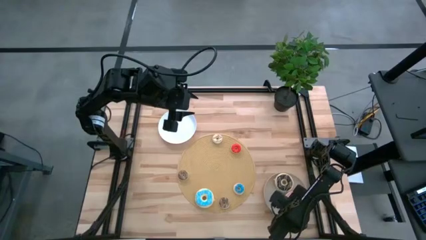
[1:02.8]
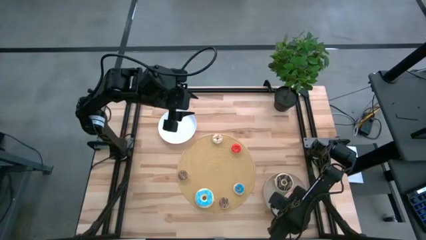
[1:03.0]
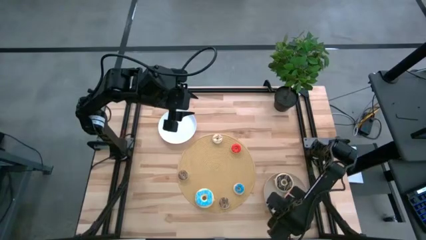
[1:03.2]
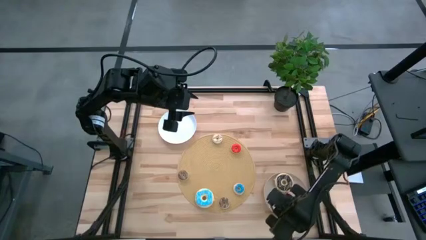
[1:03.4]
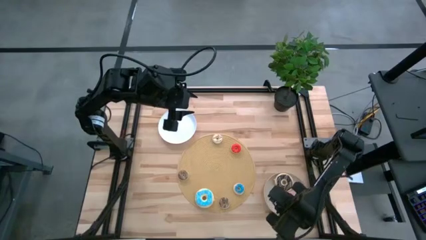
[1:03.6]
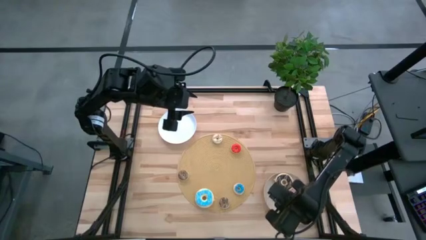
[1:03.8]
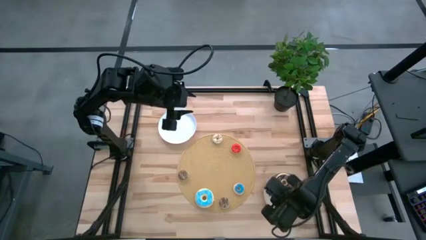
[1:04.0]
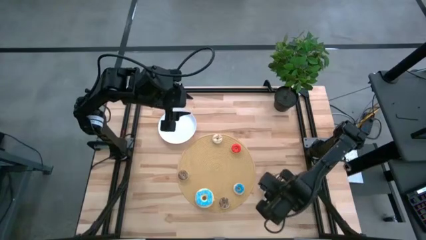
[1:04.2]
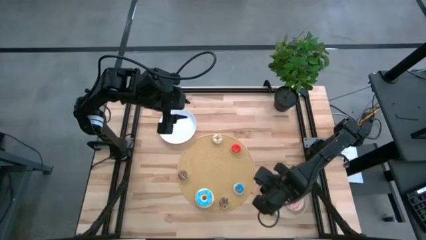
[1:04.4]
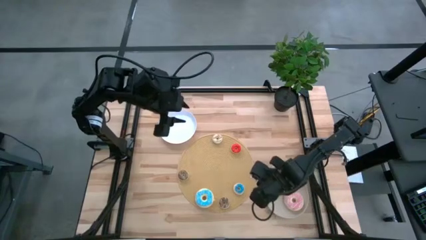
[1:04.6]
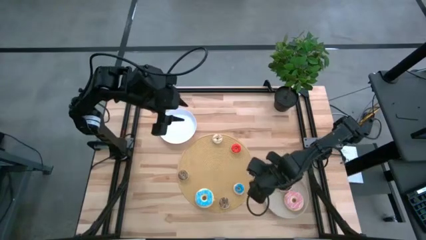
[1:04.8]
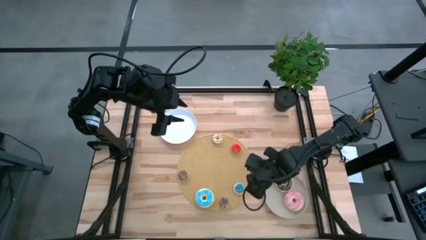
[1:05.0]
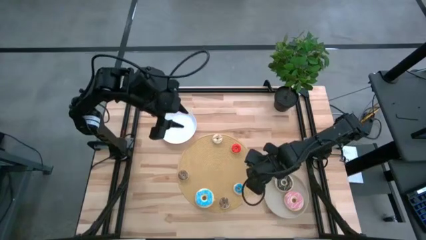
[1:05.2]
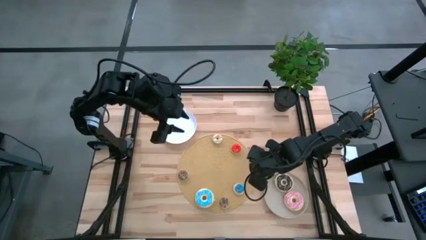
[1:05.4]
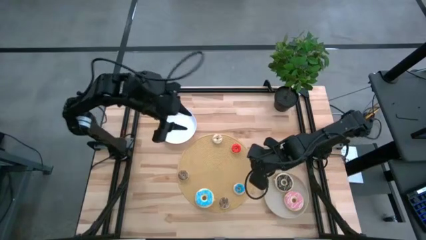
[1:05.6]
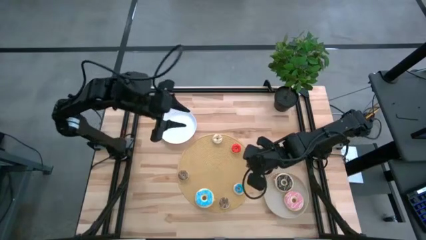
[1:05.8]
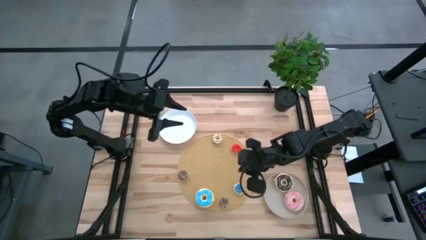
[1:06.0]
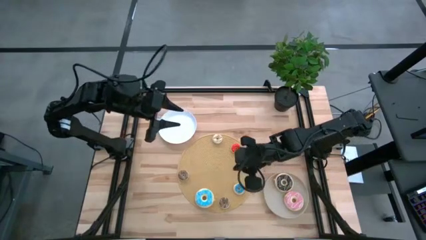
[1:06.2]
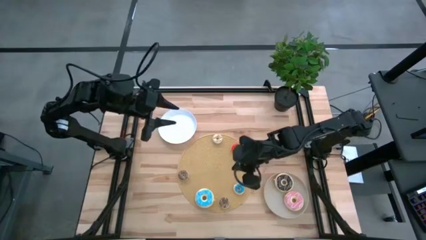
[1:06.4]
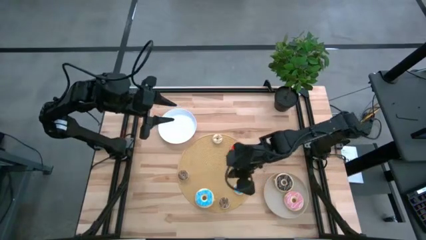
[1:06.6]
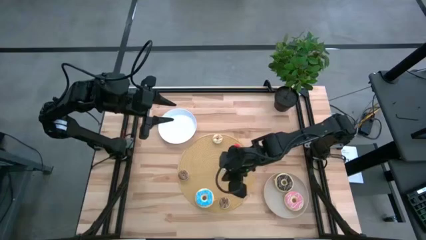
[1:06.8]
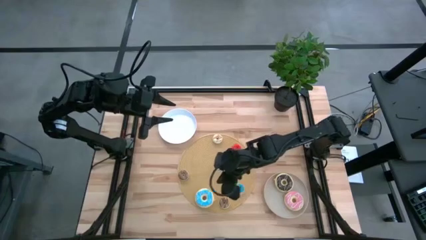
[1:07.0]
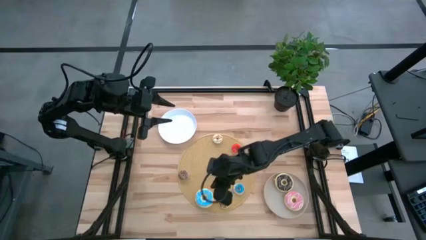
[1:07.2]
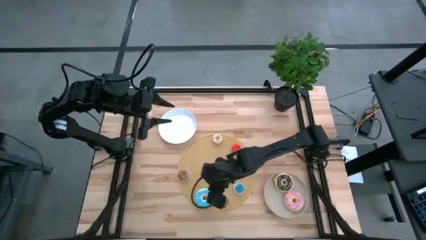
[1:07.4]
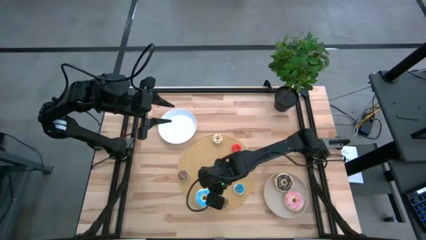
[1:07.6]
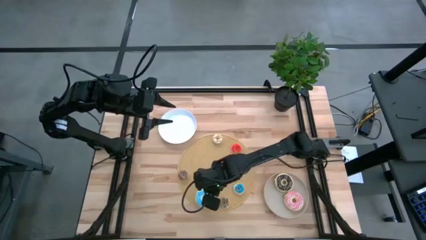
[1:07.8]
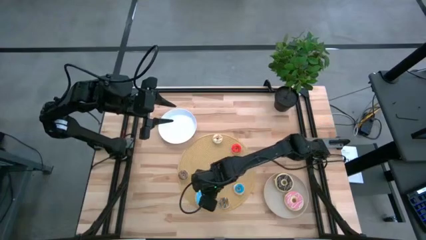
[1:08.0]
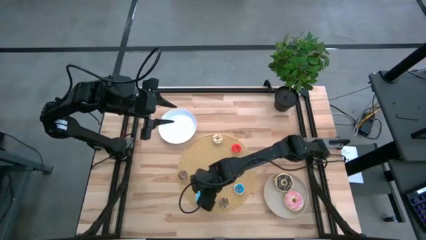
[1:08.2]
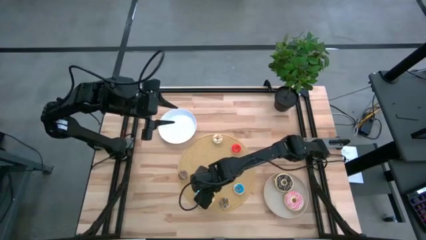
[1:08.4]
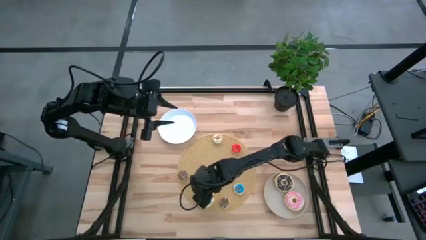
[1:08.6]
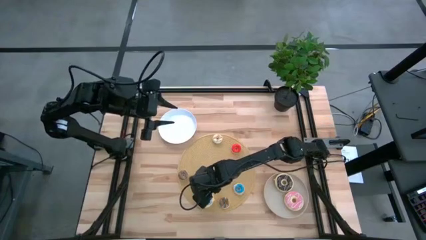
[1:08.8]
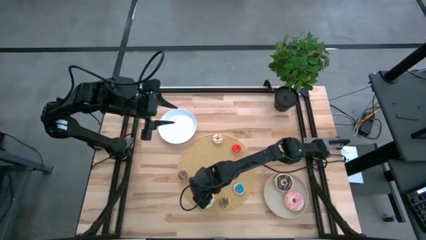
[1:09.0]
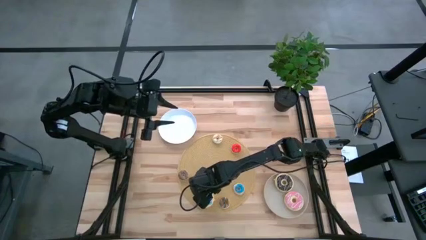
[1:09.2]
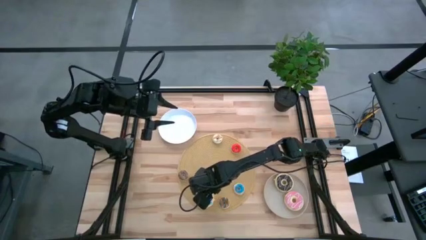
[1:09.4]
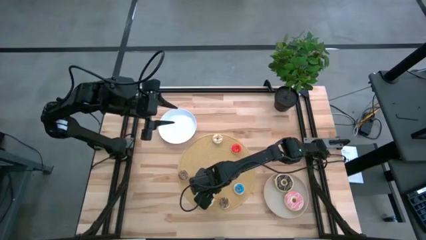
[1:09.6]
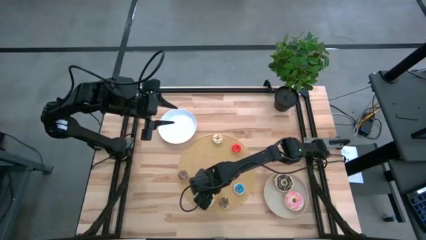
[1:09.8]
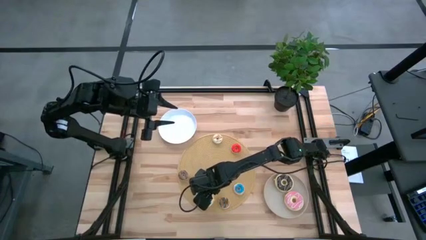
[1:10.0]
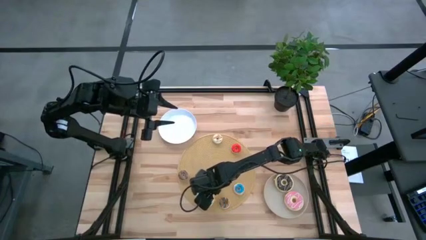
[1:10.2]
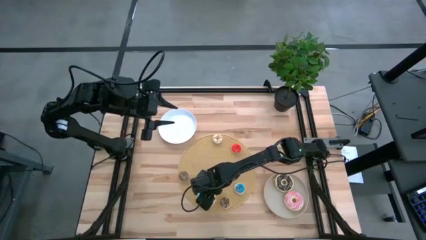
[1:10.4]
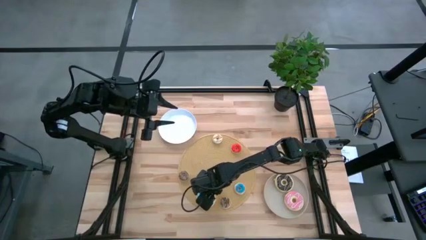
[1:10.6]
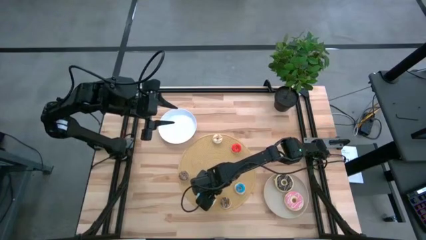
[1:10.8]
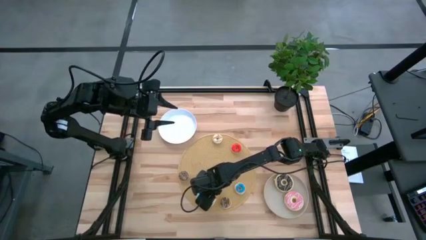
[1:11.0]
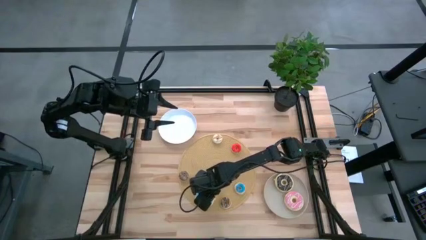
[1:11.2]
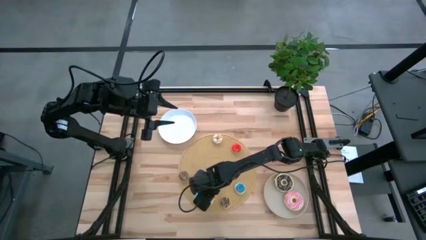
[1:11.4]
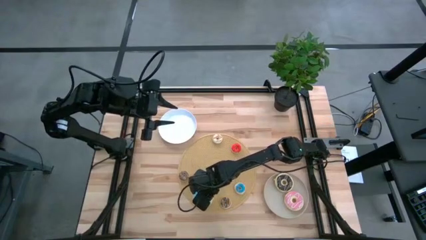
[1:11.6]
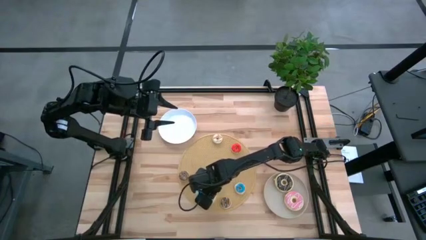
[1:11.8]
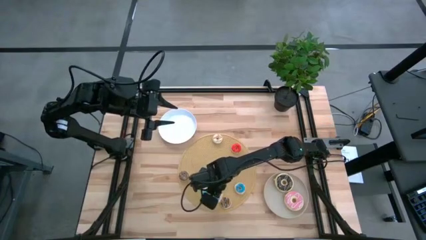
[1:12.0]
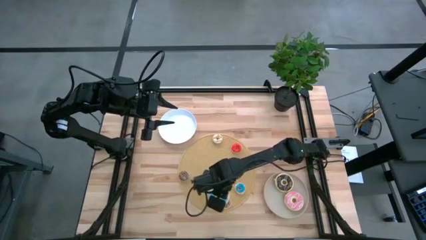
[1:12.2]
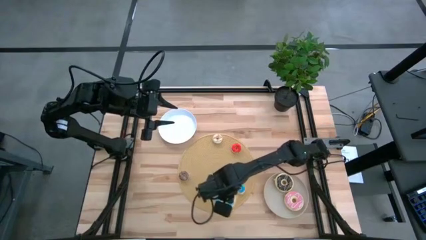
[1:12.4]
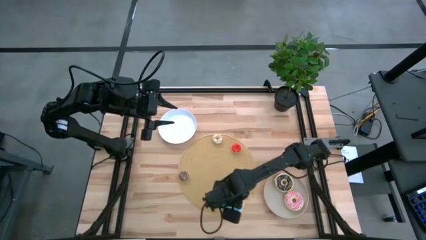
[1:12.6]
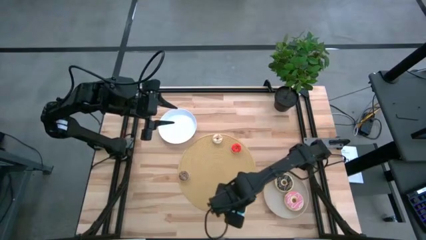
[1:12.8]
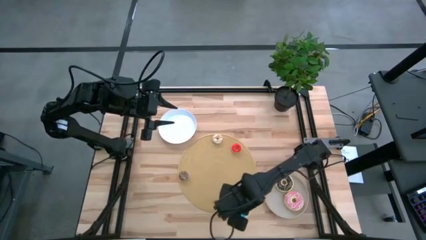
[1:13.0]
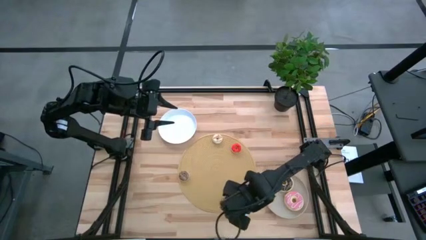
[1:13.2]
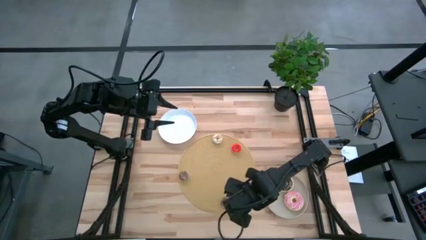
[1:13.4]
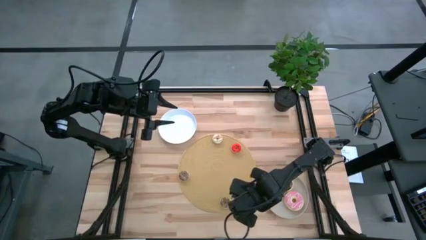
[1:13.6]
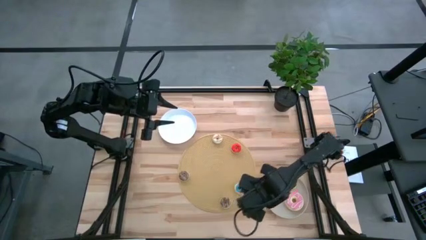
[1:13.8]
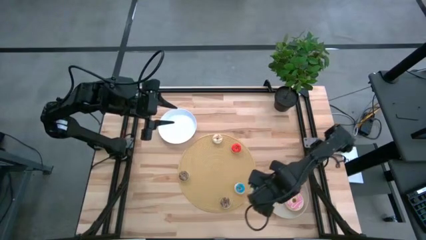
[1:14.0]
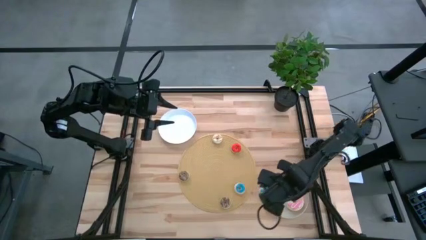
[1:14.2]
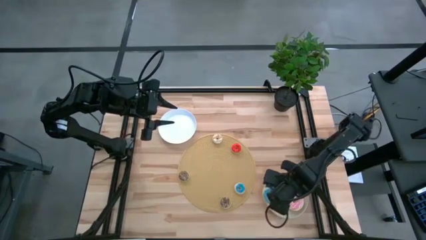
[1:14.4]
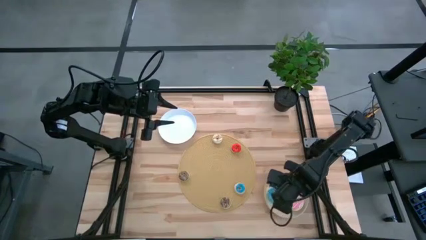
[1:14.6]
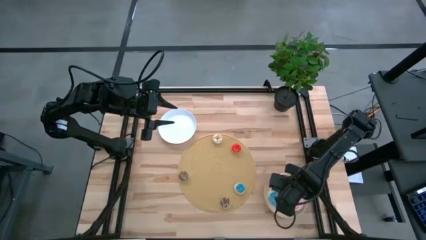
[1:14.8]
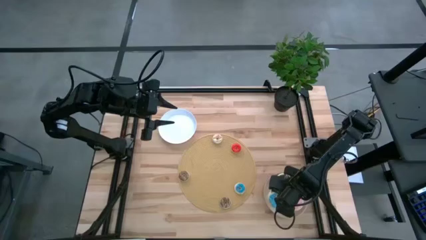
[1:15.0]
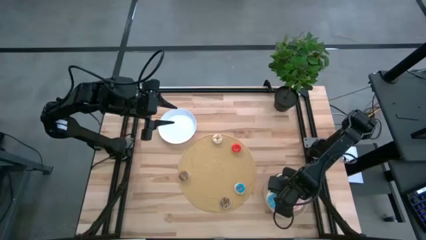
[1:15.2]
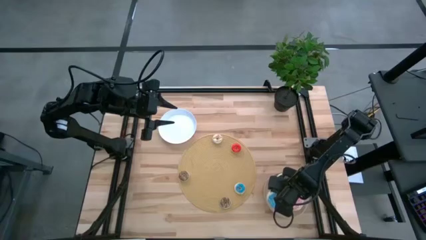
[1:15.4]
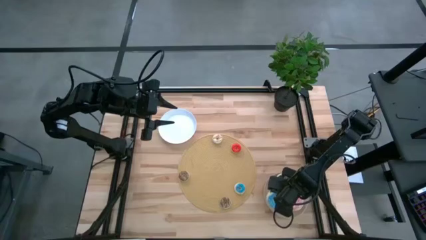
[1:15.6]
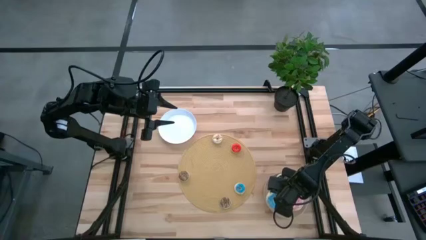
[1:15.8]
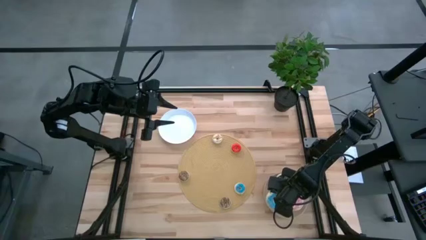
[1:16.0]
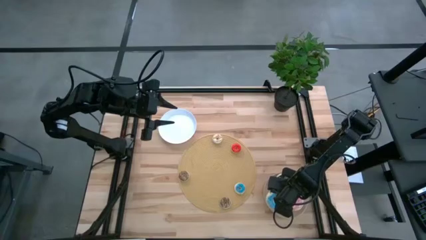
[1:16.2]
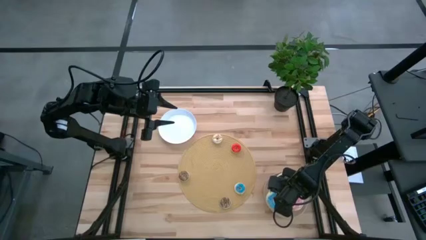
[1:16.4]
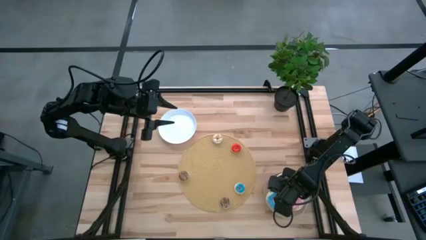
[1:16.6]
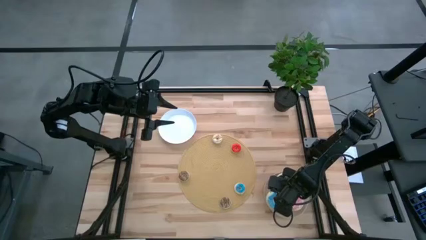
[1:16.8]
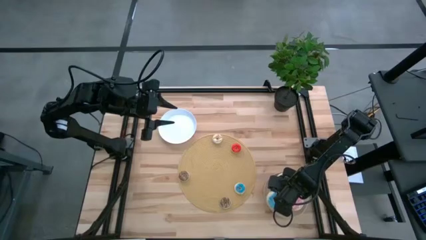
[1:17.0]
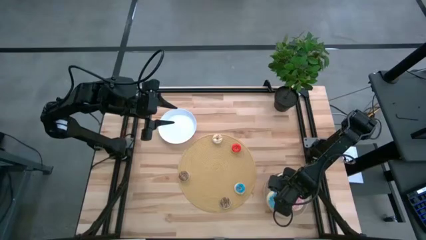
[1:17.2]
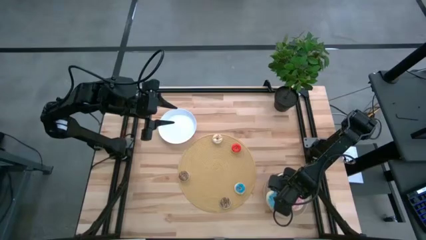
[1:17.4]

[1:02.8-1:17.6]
Task: Pick & Place donuts
Put the large blue donut into the gray plate
